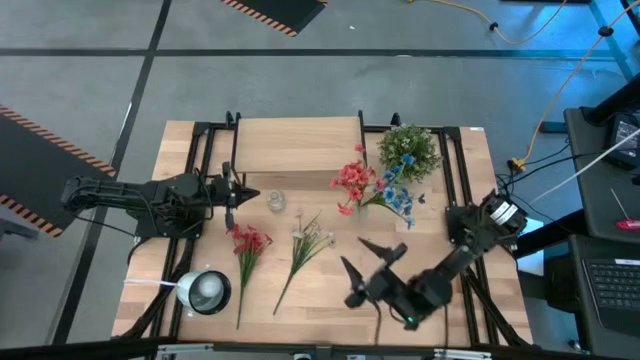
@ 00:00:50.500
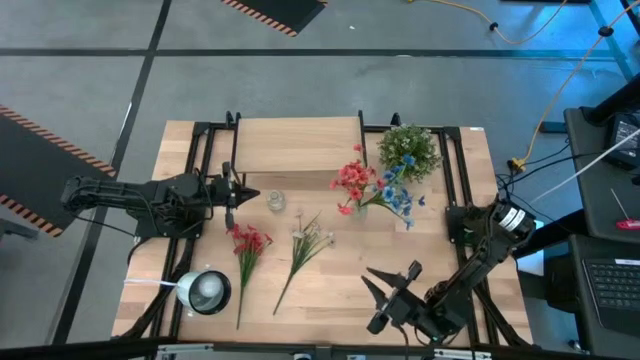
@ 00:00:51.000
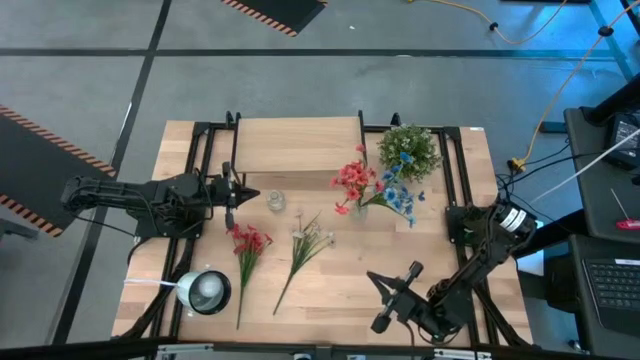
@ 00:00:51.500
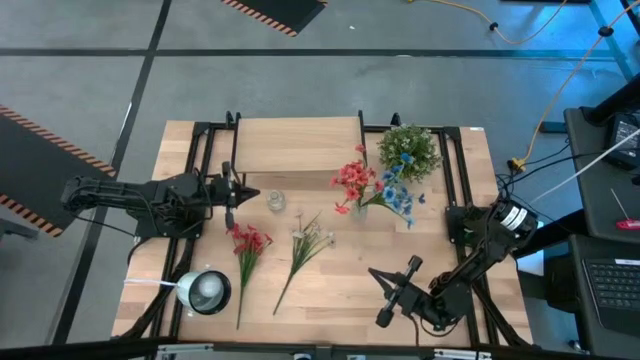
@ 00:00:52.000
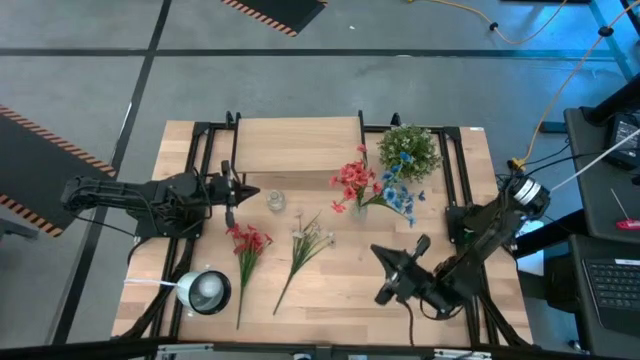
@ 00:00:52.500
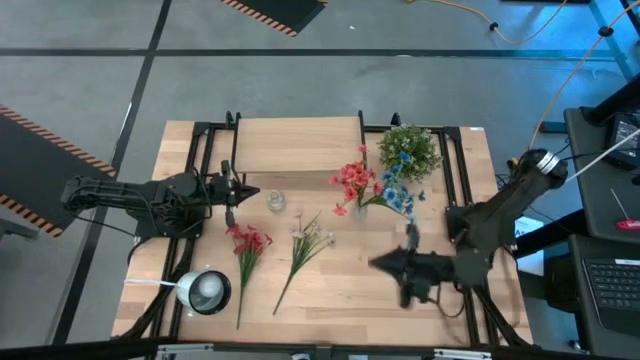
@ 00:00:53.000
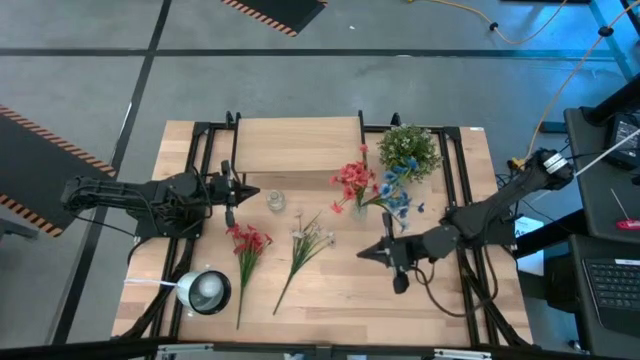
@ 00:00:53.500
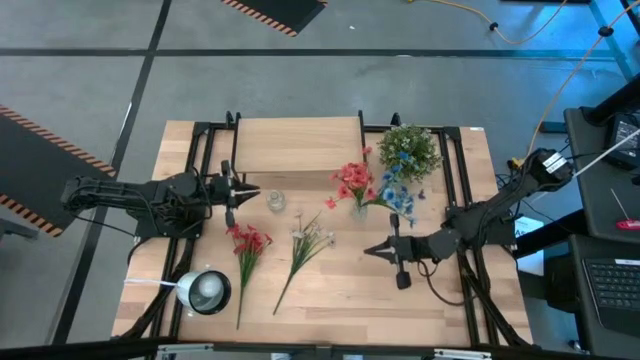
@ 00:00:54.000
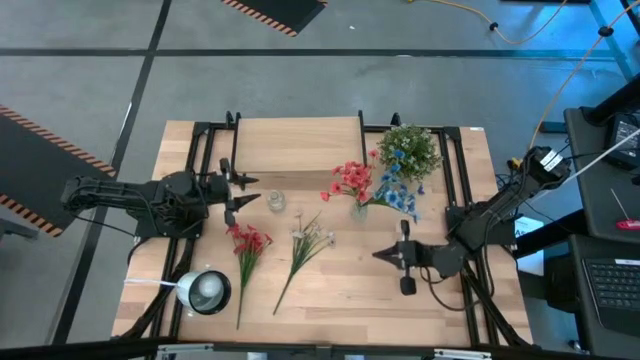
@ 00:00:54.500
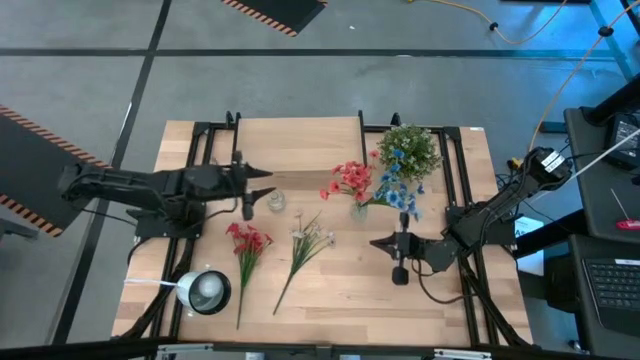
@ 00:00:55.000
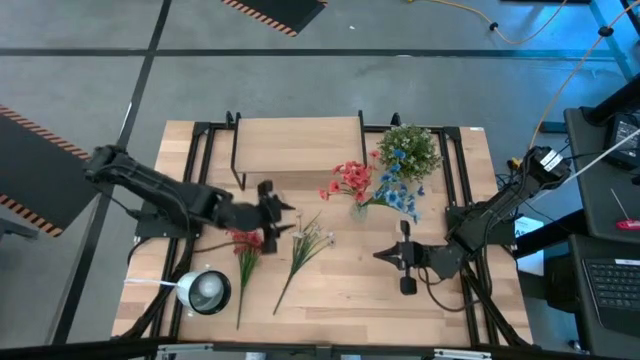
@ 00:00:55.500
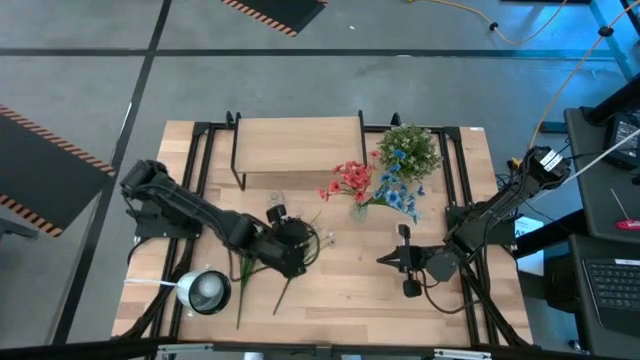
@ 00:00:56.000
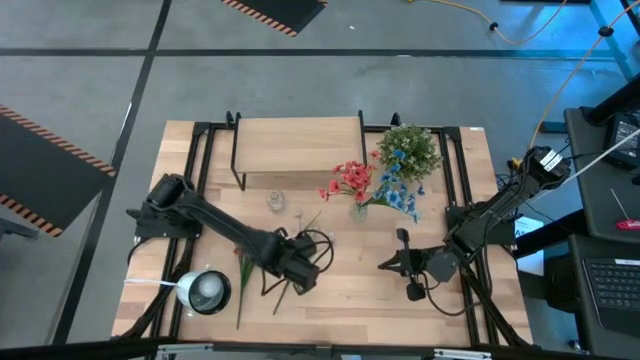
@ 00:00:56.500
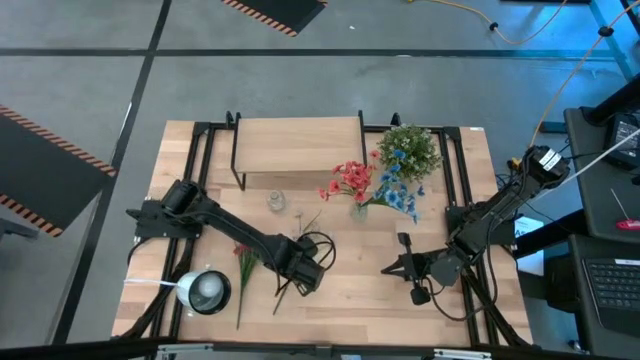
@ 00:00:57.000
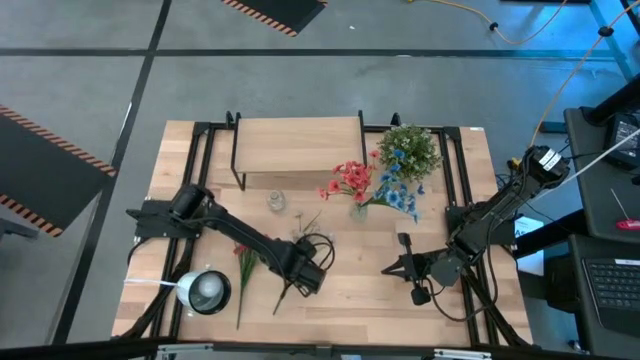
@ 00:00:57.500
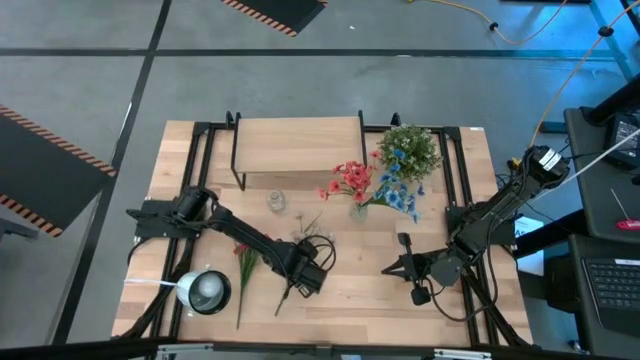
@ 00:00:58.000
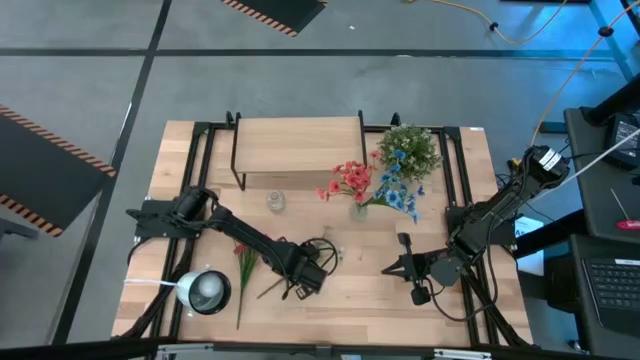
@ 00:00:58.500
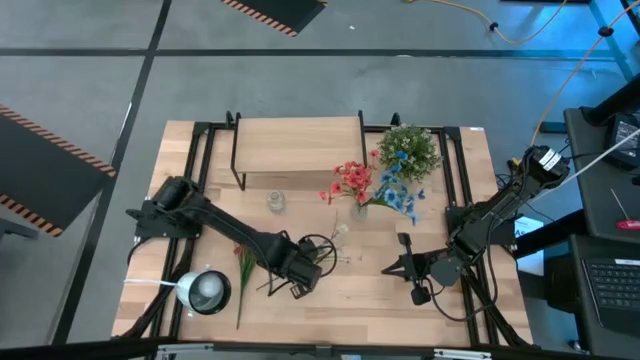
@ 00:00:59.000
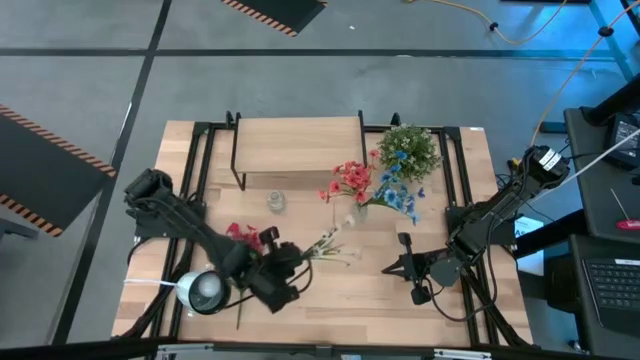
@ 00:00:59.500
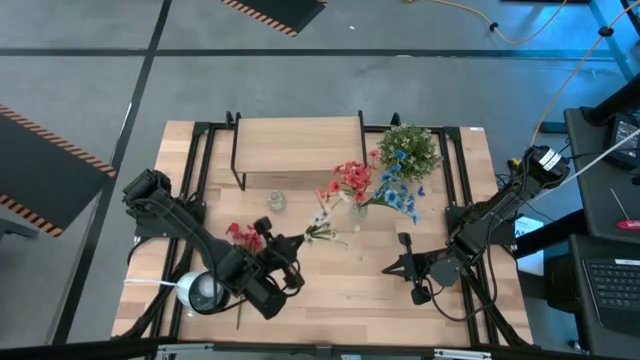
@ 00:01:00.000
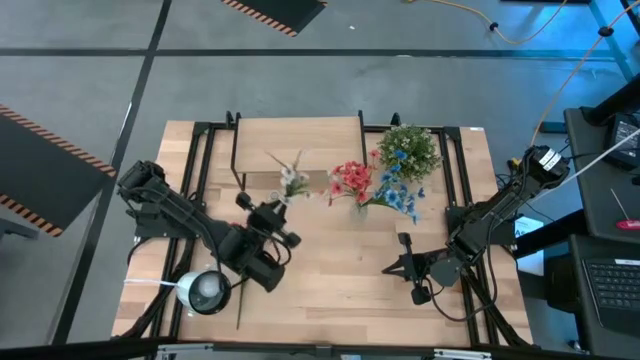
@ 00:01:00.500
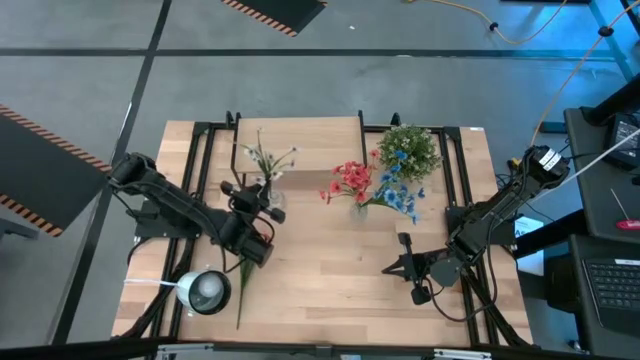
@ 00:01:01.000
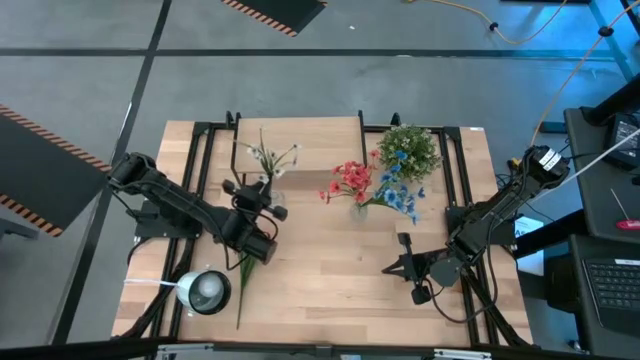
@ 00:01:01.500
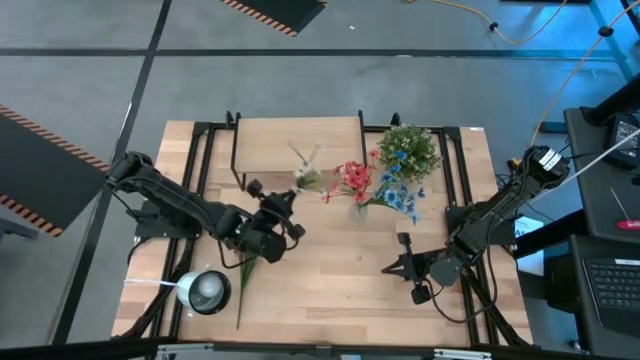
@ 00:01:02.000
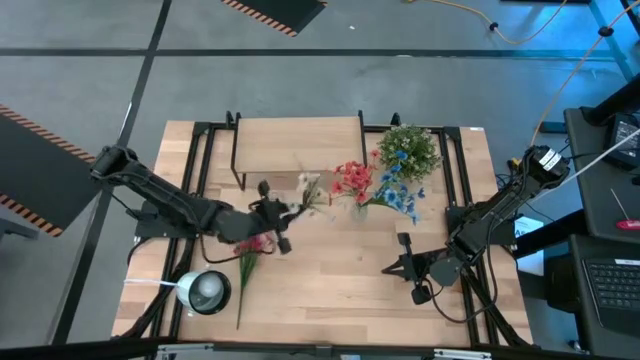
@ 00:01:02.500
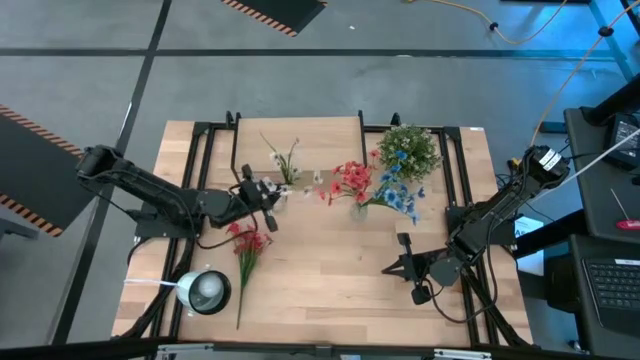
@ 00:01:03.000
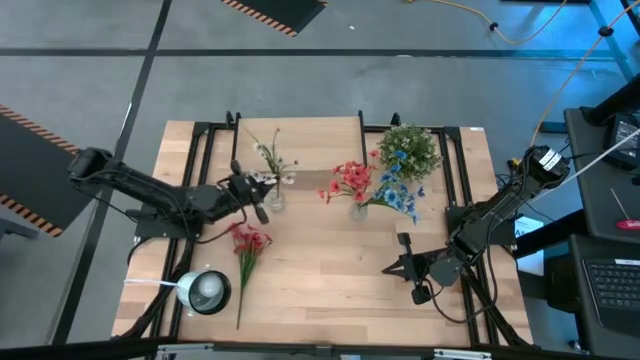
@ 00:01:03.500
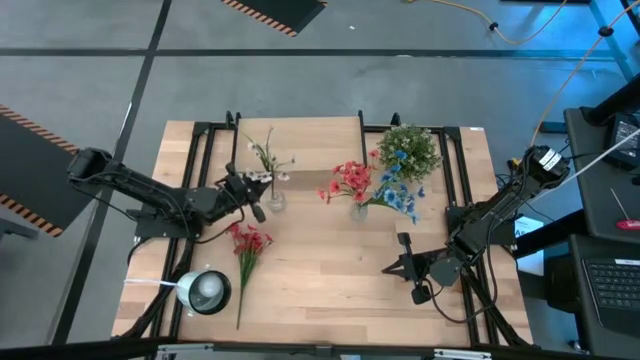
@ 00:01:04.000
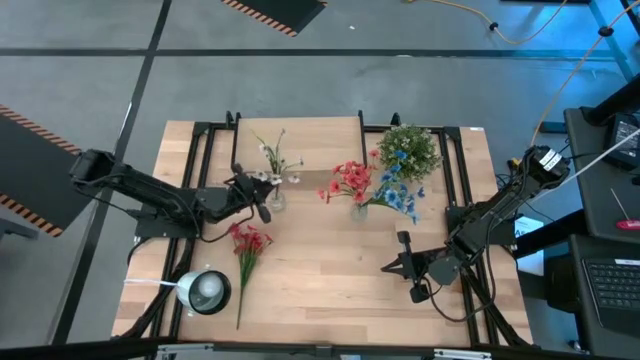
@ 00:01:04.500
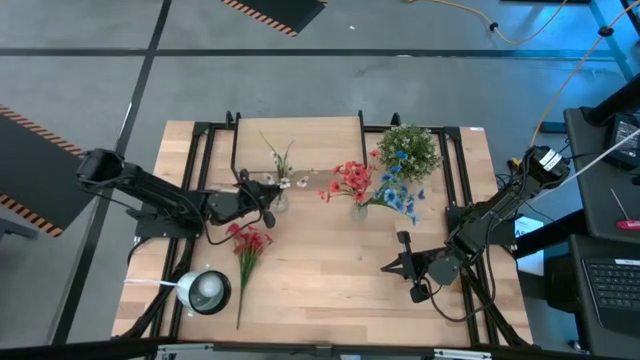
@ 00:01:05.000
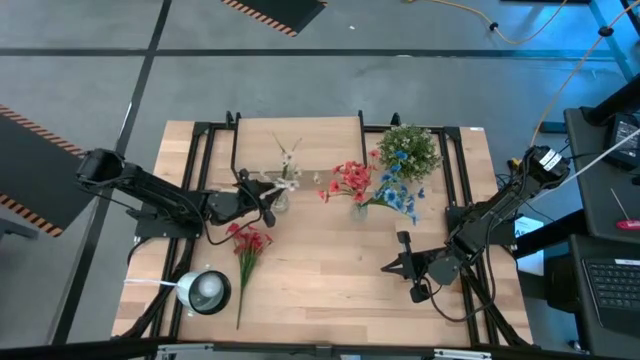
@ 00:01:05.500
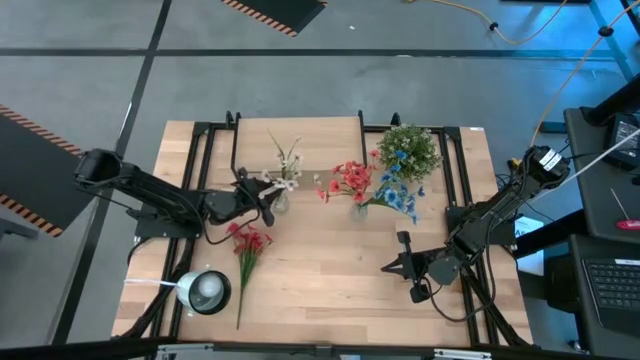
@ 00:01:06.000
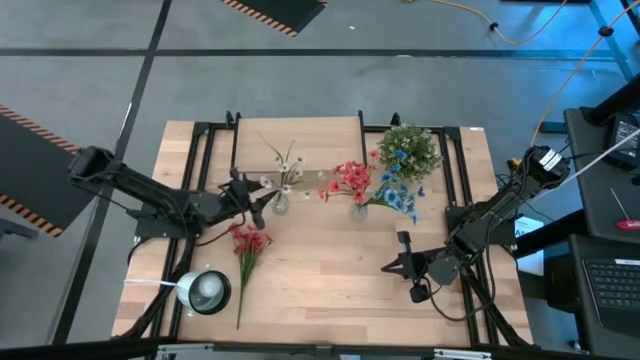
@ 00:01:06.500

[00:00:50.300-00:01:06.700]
Task: Pick and place flowers into a vace then onto a shelf
Put the white flowers into the left transparent vase

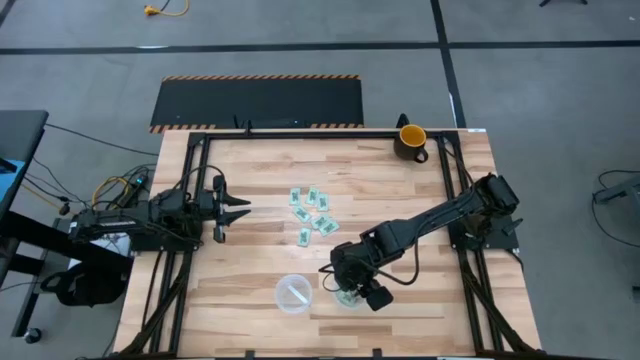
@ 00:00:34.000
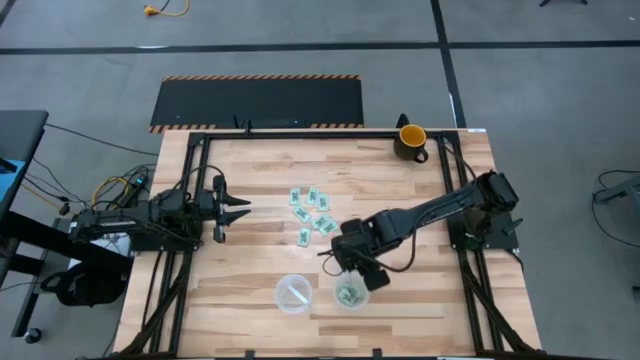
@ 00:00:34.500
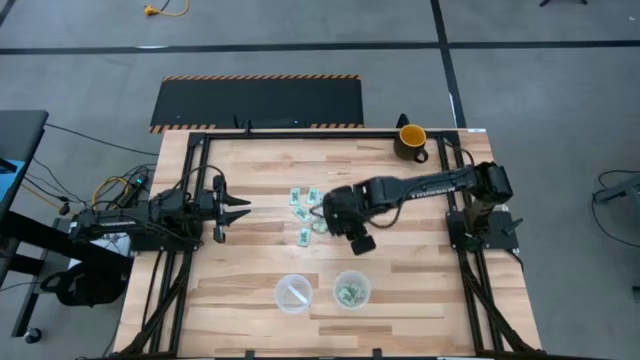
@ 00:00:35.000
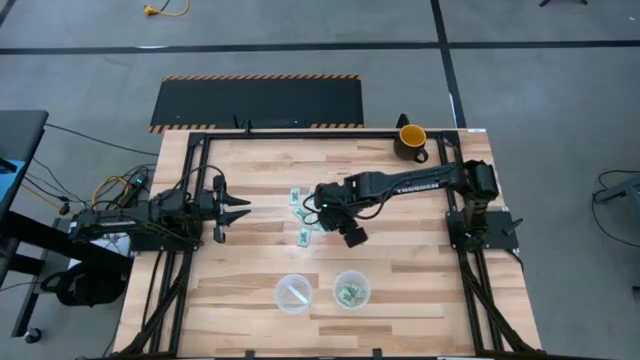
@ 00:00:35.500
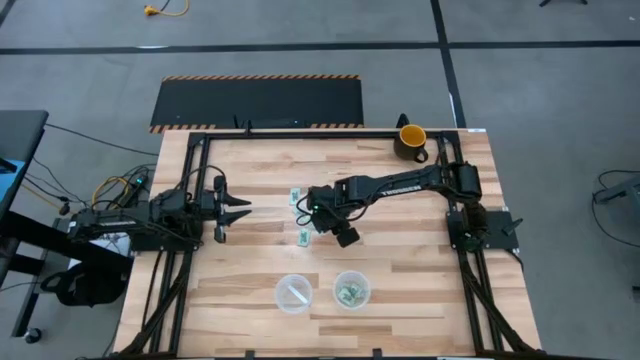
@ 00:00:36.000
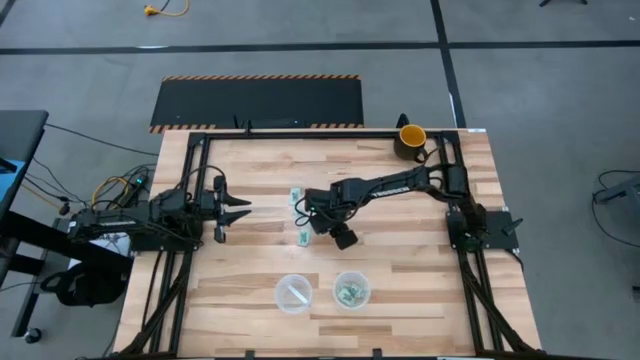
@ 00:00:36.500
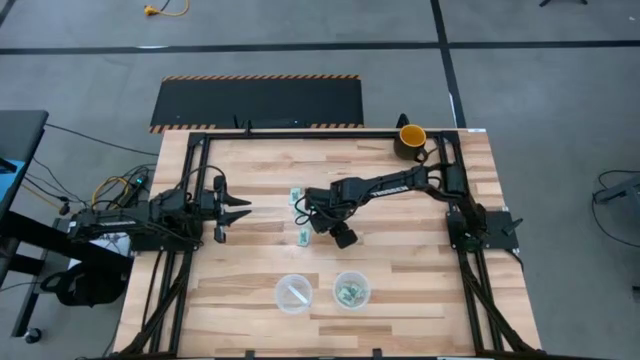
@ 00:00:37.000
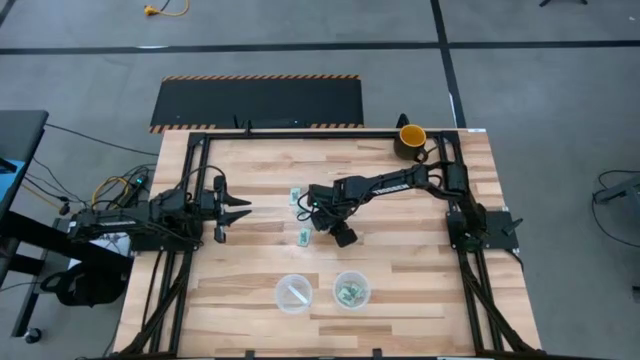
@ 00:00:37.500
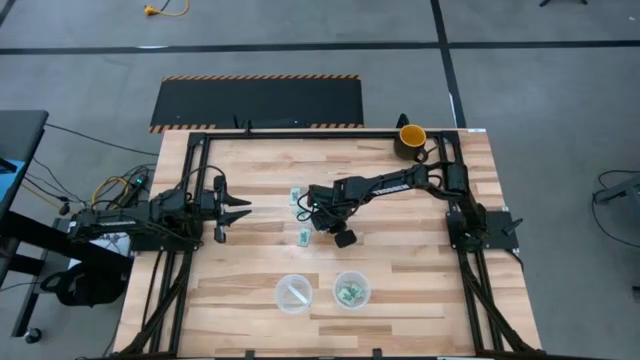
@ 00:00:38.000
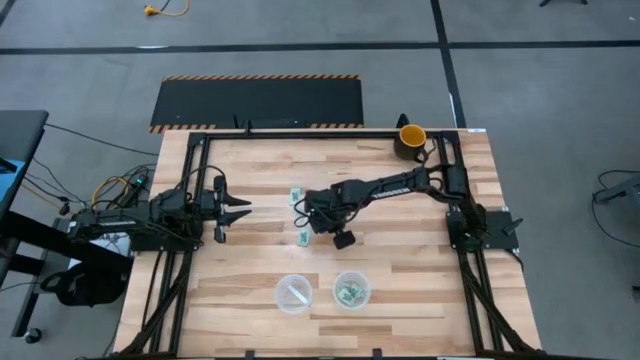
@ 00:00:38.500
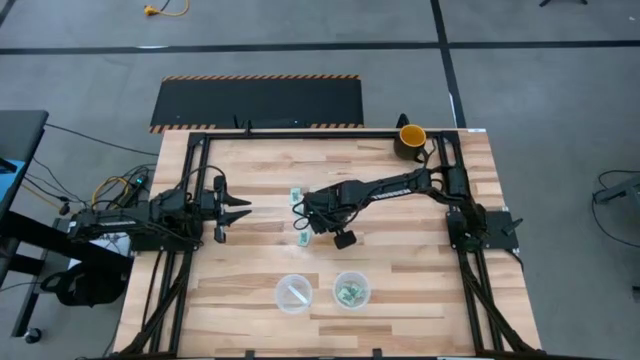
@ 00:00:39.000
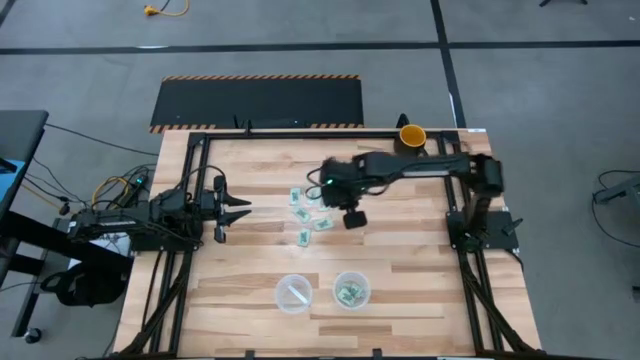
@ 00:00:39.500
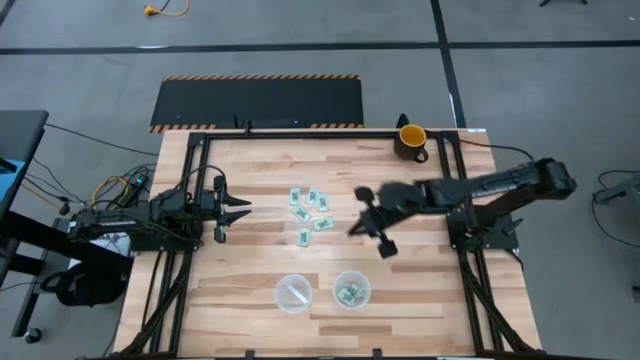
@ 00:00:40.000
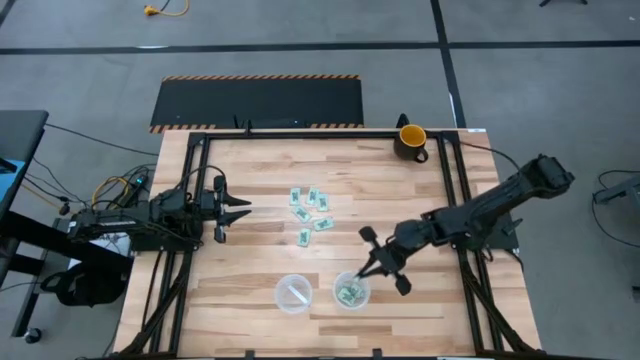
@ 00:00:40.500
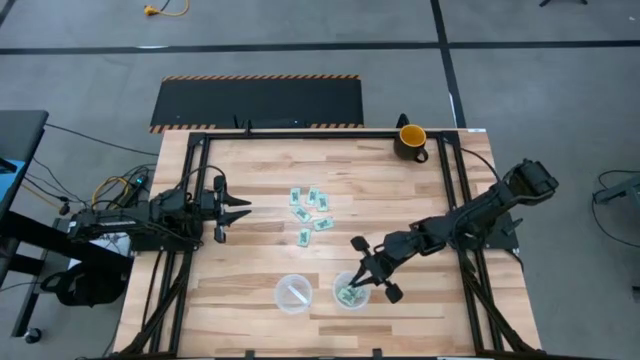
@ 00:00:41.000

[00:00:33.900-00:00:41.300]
Task: Pick and place Stevia / Truvia into bins
Put the white stevia pack into the right transparent basket
